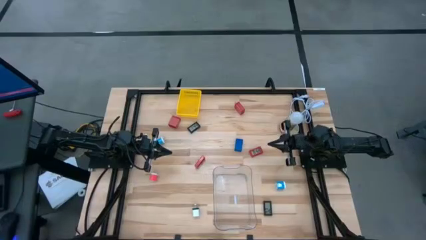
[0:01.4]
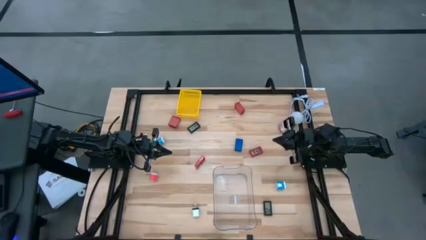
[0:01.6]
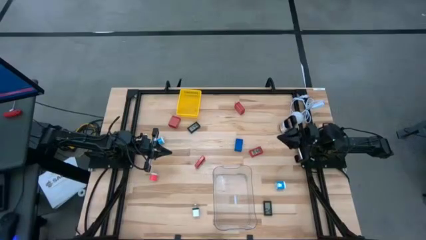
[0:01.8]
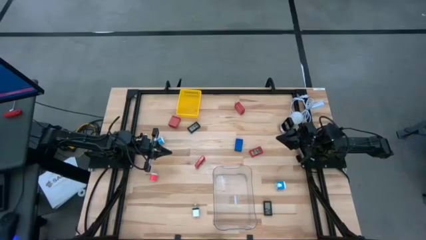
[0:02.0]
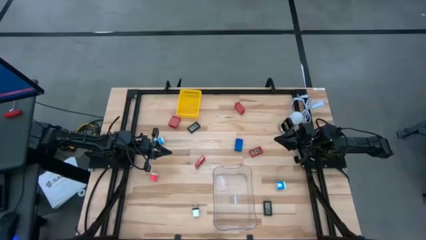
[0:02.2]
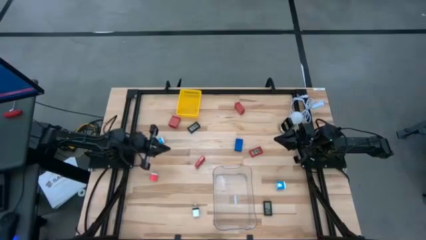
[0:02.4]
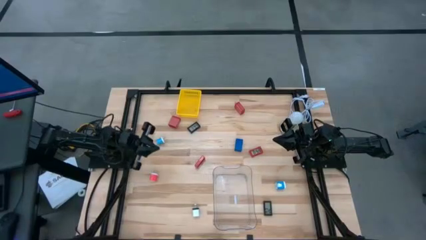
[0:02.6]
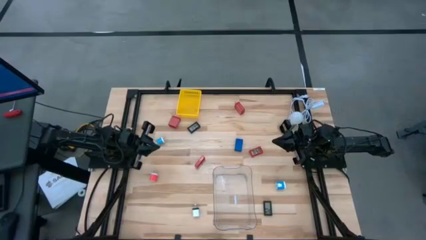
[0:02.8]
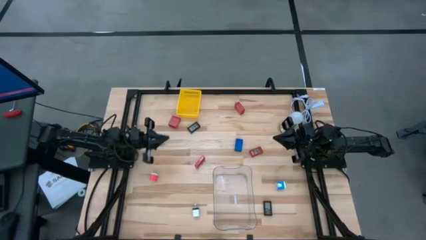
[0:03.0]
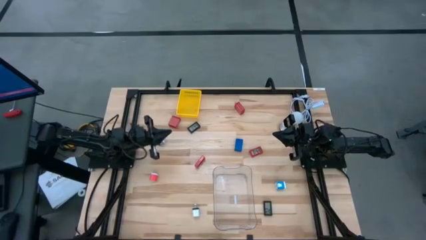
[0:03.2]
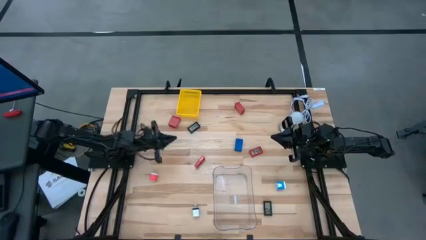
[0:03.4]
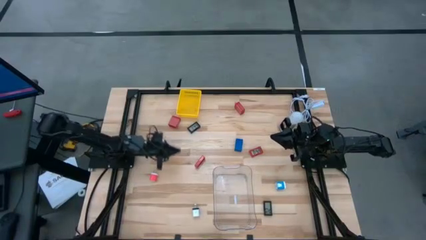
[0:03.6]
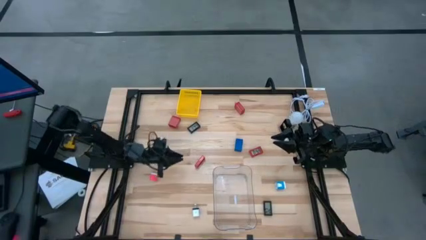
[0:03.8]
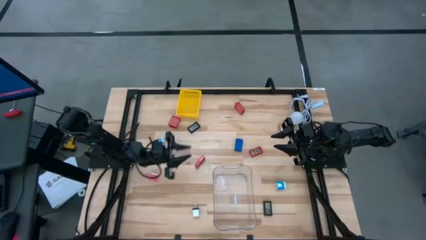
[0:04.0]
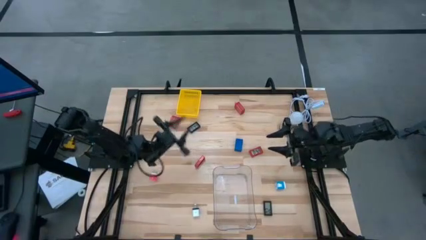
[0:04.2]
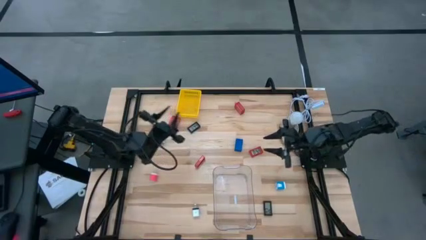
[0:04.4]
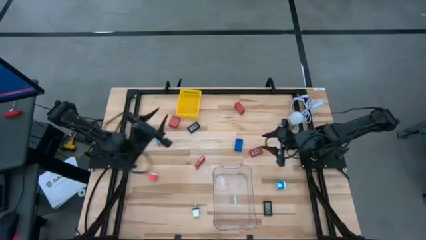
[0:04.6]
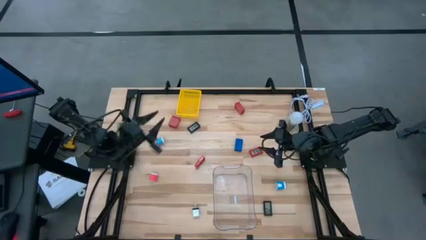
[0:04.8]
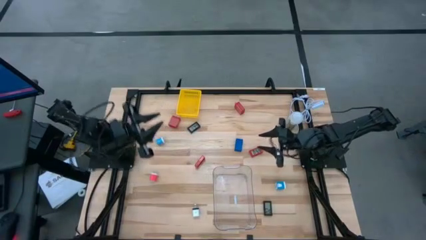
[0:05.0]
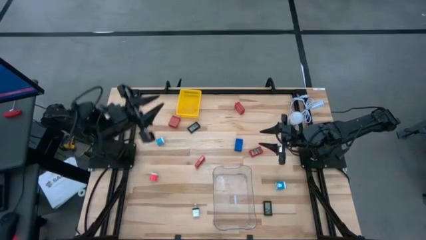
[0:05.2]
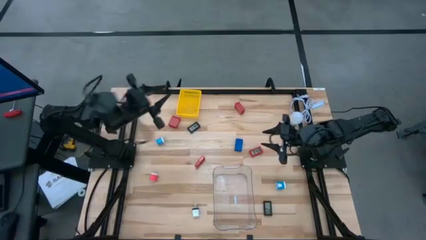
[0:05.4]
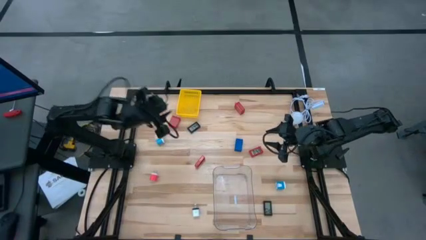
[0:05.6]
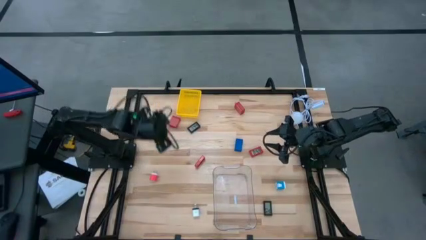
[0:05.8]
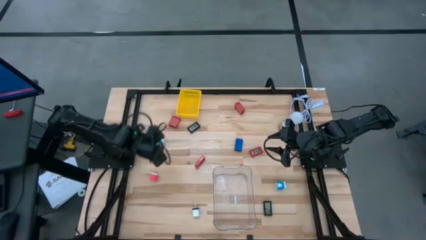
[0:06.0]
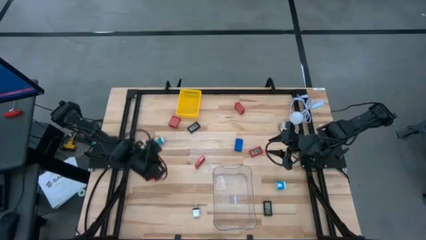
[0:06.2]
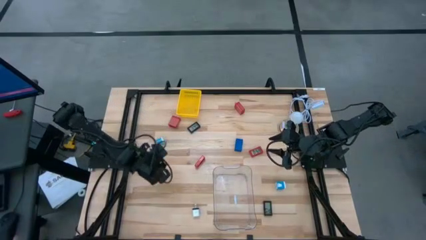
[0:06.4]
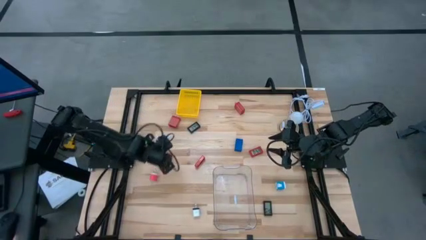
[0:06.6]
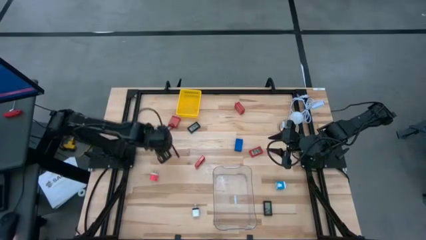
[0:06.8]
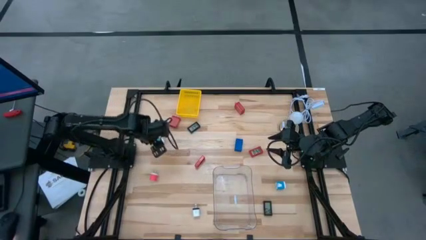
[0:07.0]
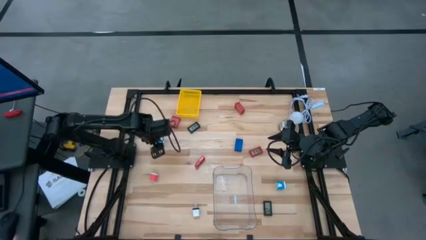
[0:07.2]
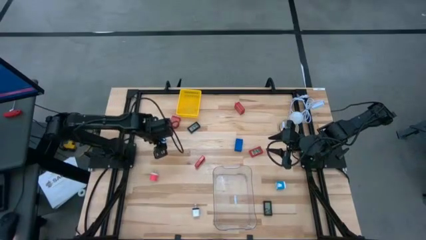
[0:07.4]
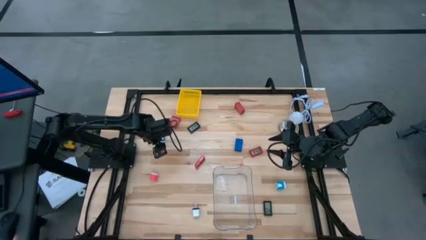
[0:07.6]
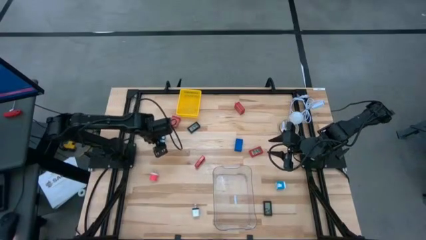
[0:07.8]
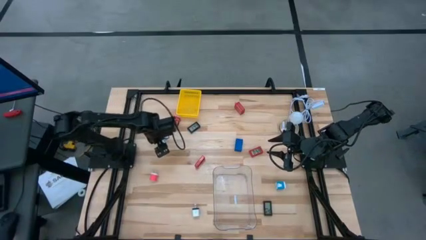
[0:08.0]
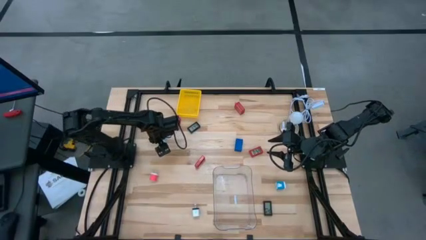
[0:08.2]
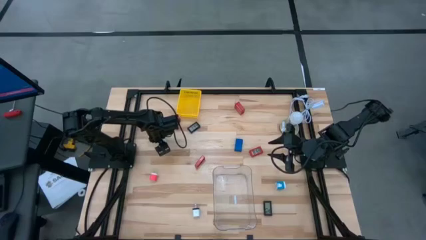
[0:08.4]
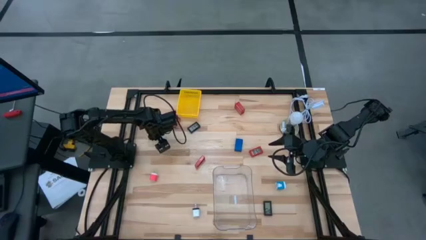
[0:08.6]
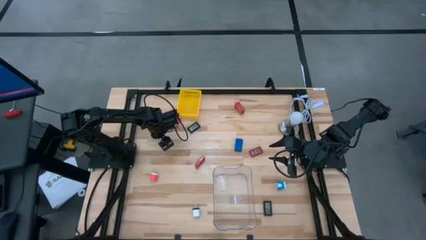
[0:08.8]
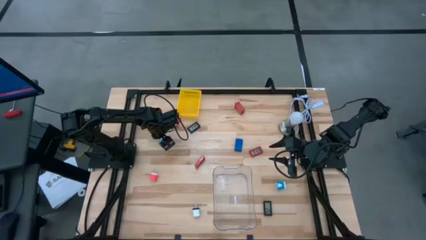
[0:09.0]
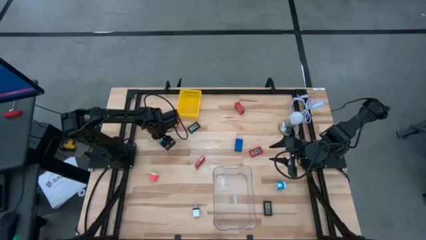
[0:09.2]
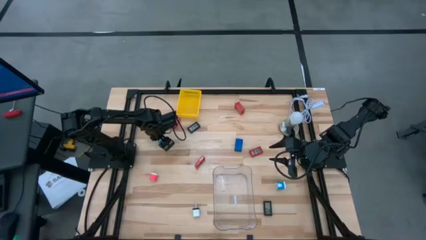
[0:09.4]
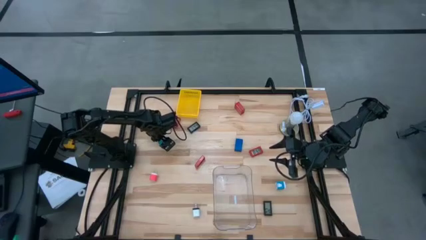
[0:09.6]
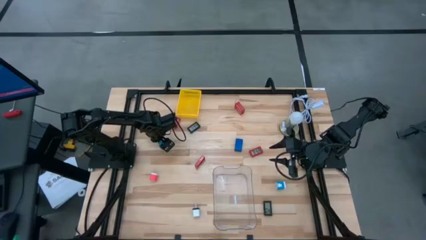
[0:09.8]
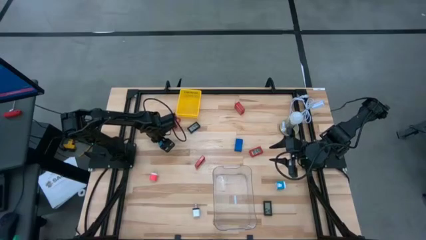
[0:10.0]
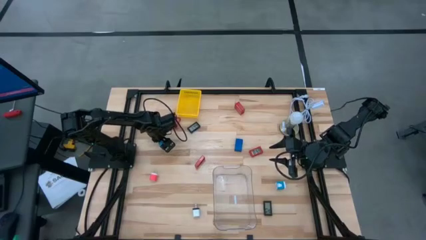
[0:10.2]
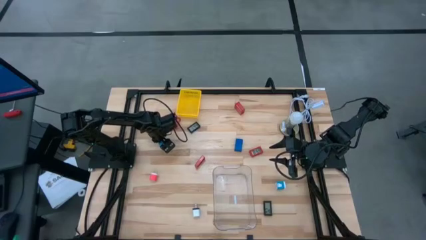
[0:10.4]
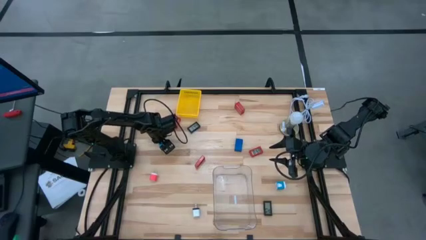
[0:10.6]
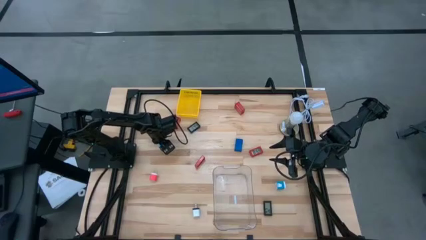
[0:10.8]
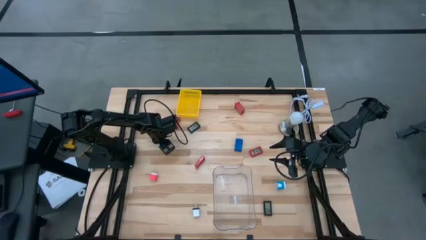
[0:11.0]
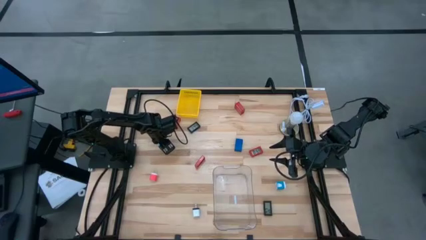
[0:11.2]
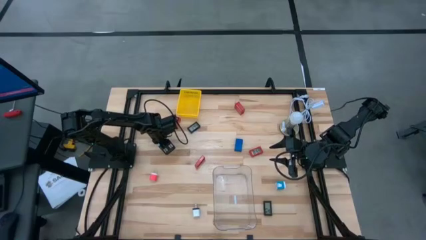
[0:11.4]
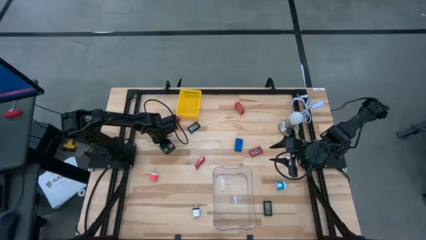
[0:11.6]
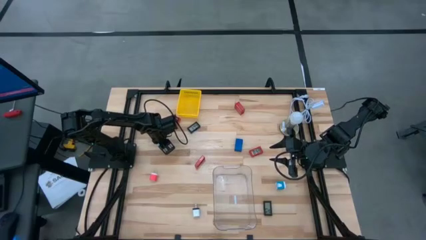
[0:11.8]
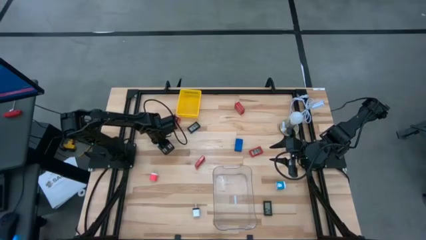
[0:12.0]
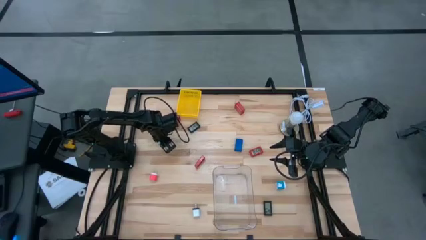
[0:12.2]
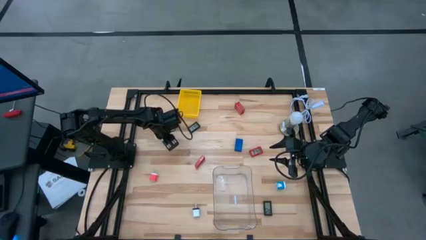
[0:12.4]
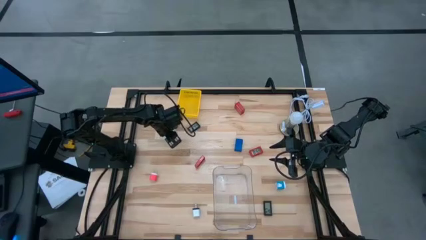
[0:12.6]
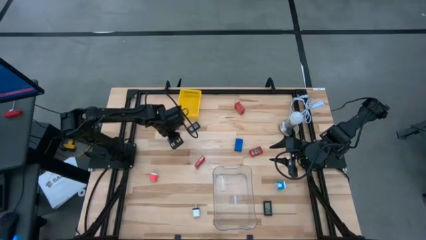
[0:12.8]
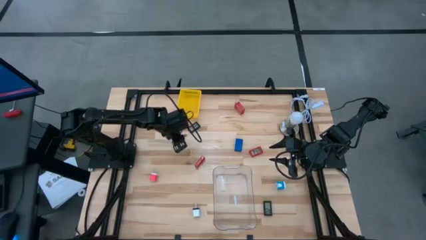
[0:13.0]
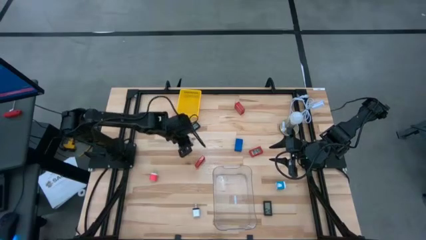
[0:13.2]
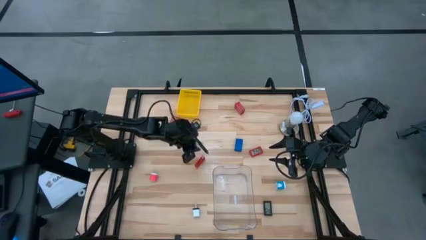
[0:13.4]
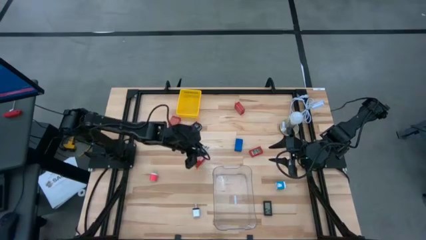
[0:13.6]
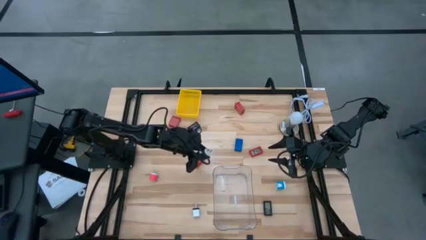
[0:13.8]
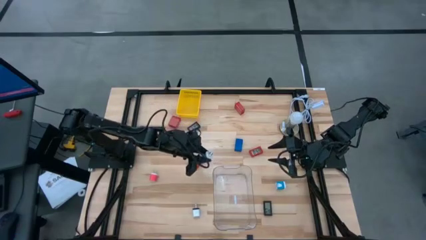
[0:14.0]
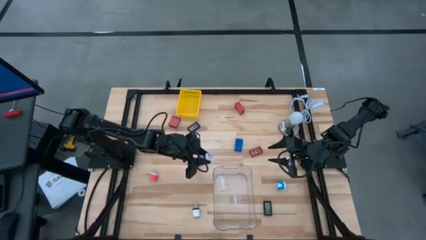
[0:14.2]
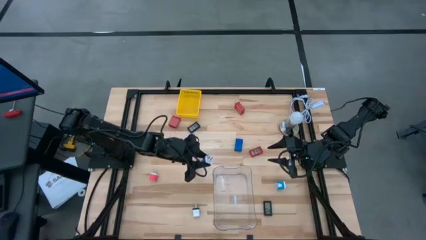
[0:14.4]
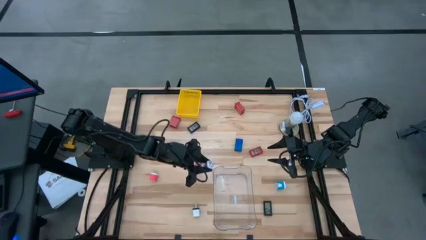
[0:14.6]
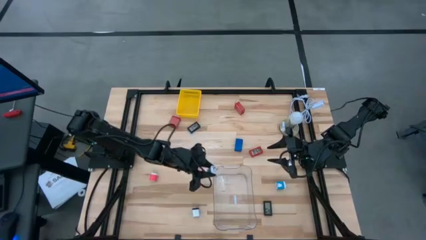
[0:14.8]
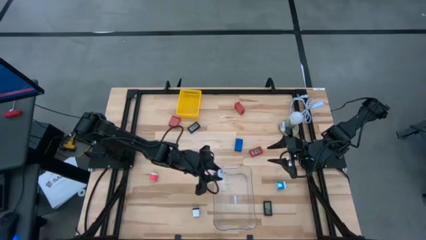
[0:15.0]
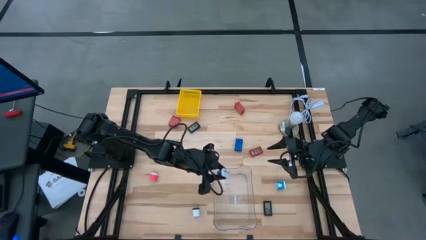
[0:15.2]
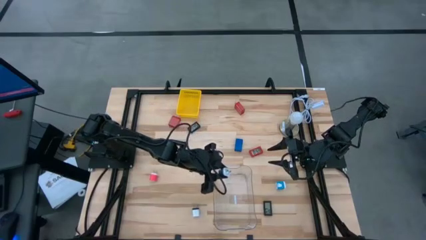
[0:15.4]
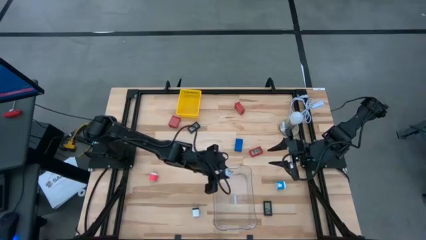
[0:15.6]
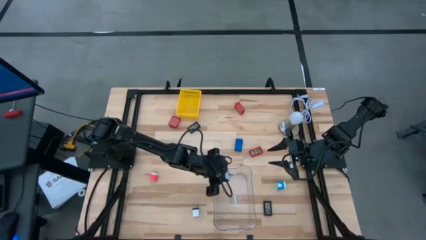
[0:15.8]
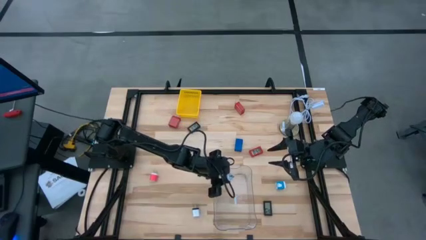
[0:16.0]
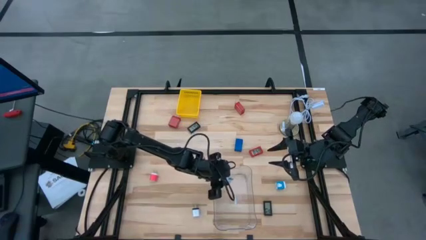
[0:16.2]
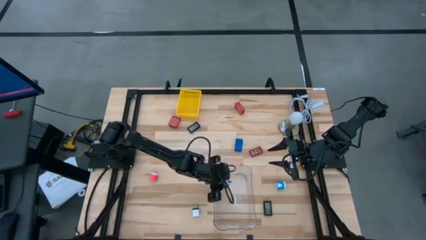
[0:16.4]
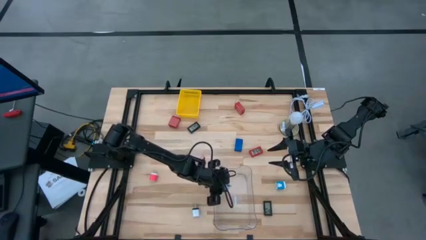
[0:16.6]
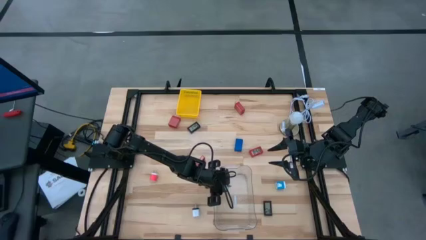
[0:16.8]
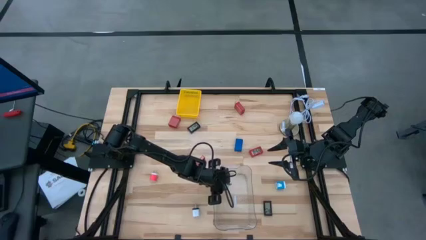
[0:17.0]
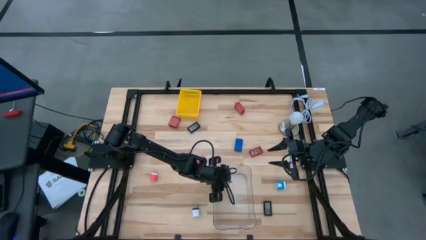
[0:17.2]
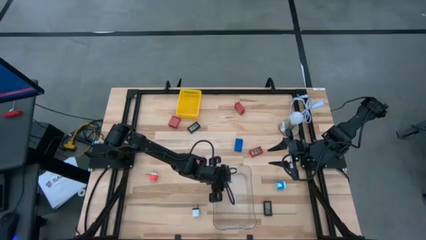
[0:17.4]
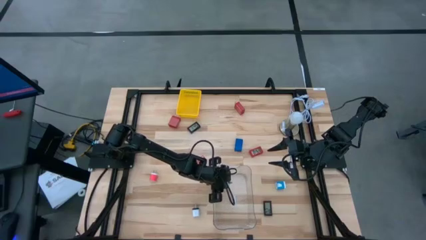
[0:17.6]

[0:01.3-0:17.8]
Task: Pick & Place Office items
Put the left blue power adapter into the clear bin
